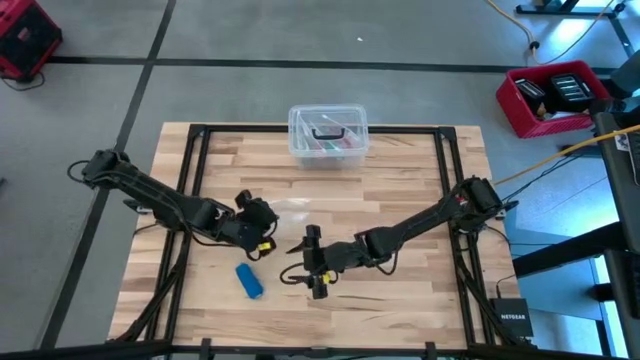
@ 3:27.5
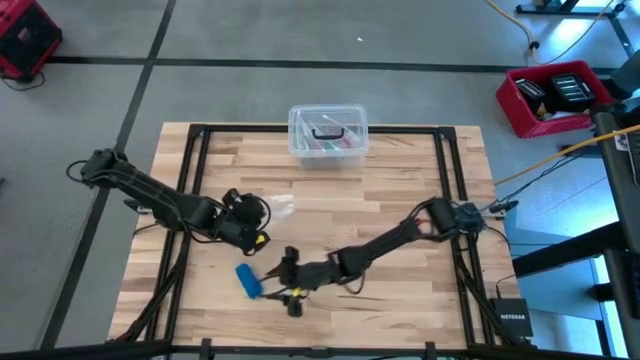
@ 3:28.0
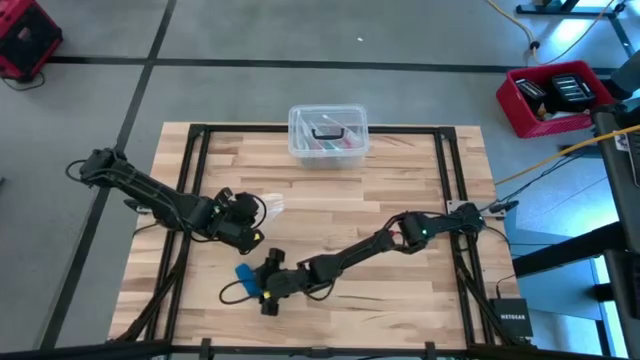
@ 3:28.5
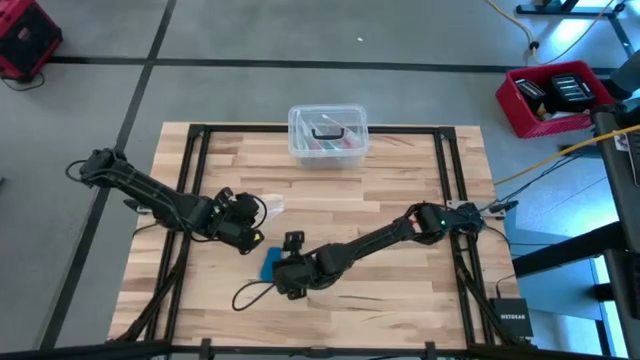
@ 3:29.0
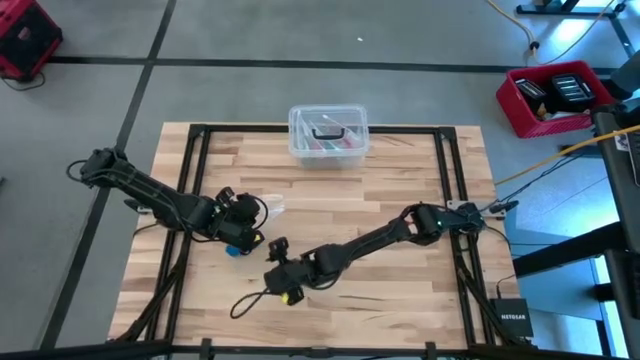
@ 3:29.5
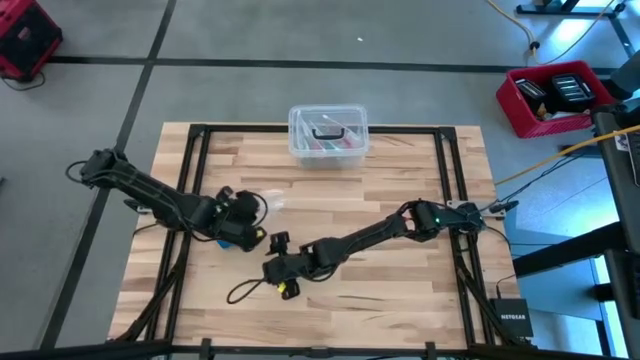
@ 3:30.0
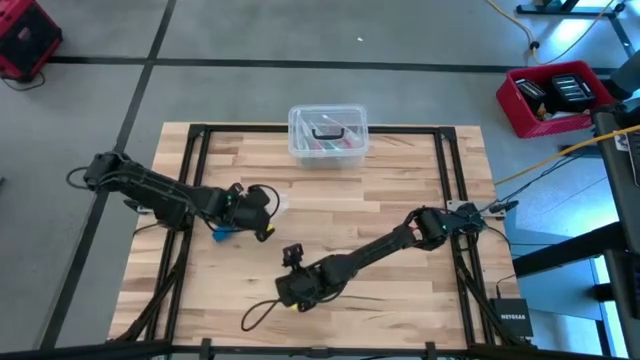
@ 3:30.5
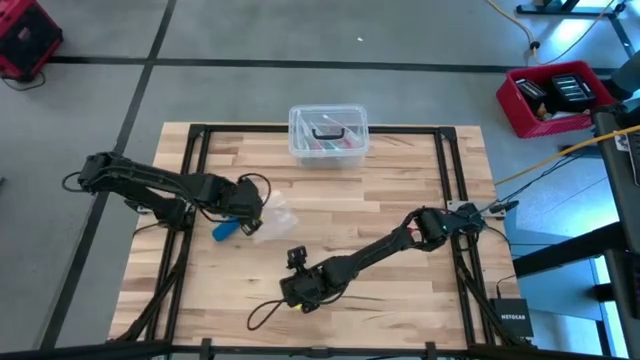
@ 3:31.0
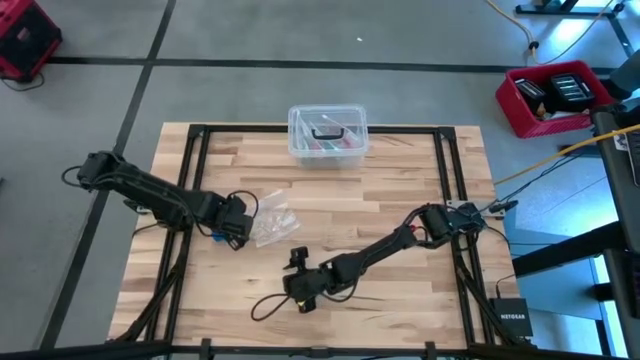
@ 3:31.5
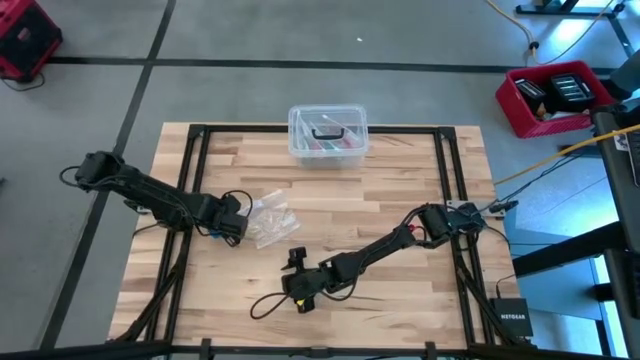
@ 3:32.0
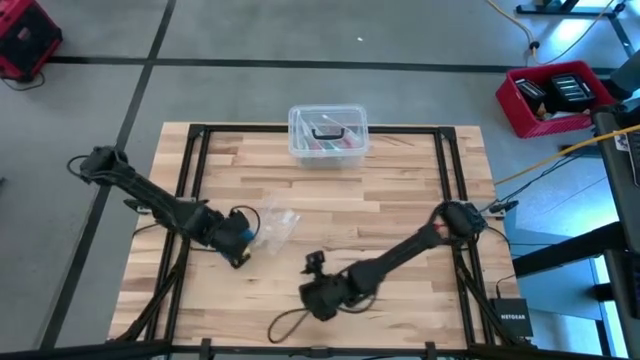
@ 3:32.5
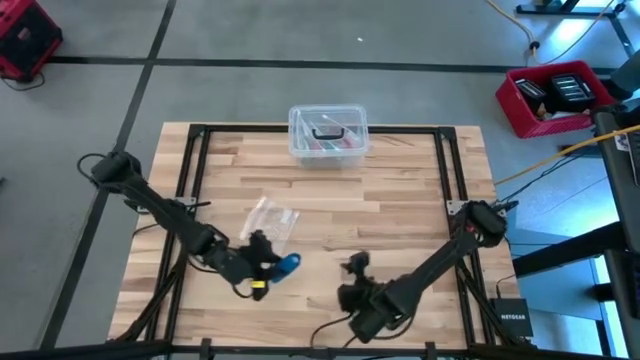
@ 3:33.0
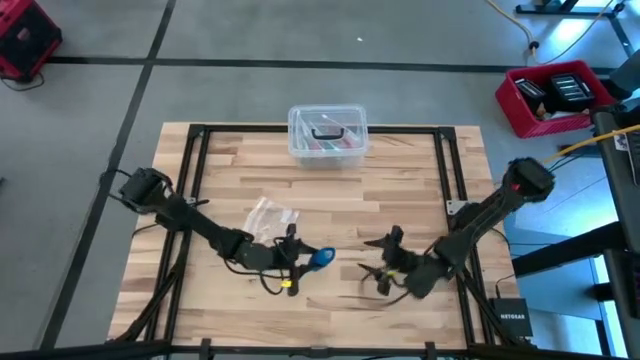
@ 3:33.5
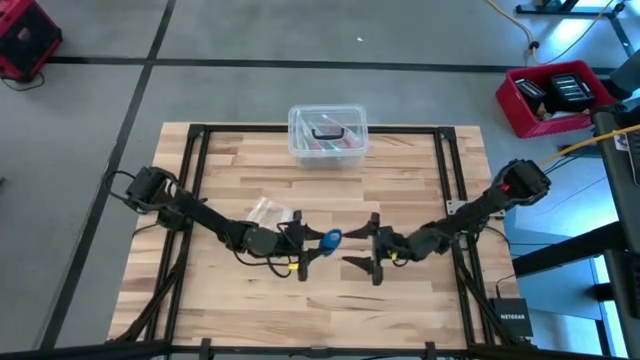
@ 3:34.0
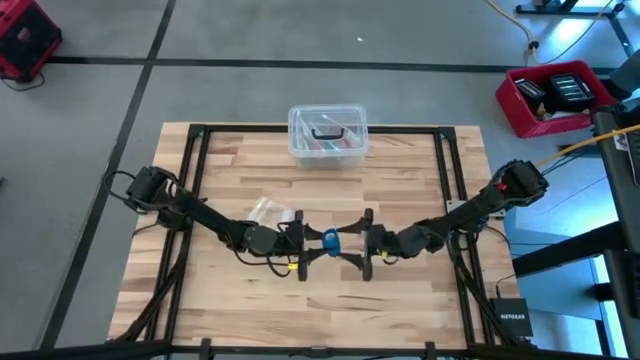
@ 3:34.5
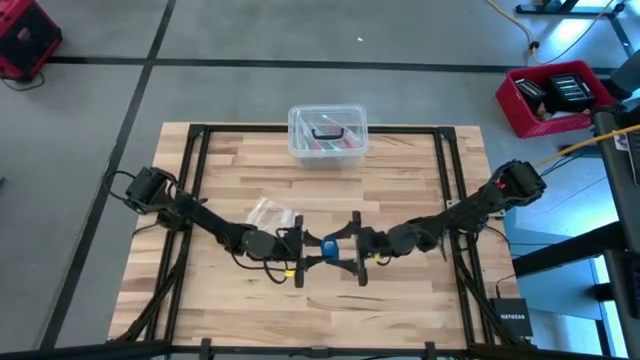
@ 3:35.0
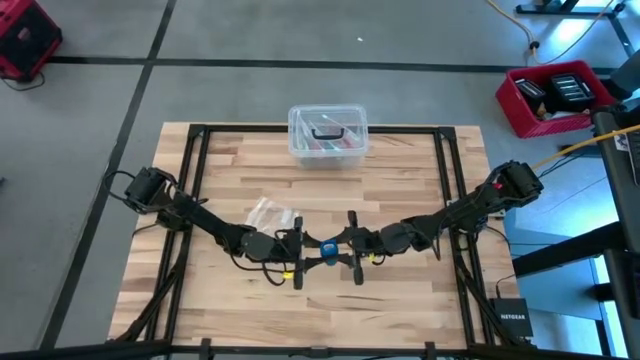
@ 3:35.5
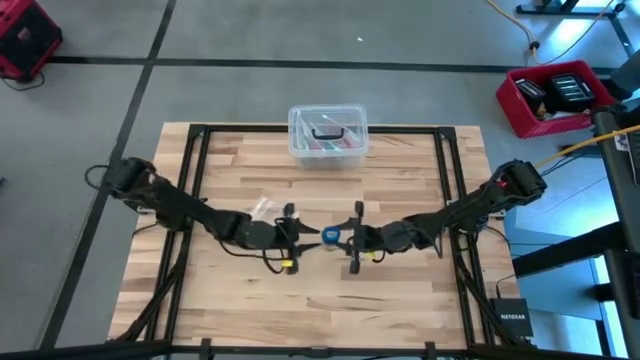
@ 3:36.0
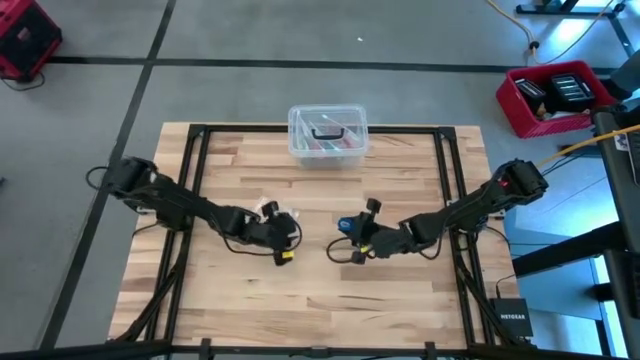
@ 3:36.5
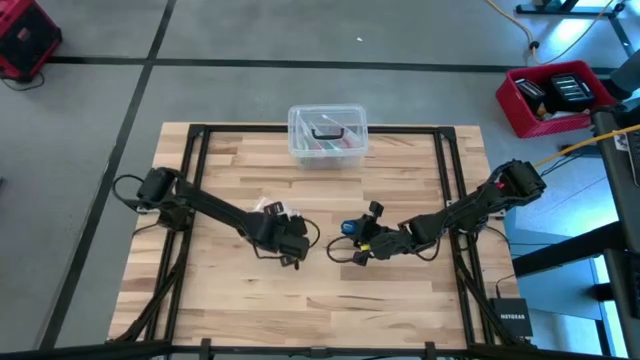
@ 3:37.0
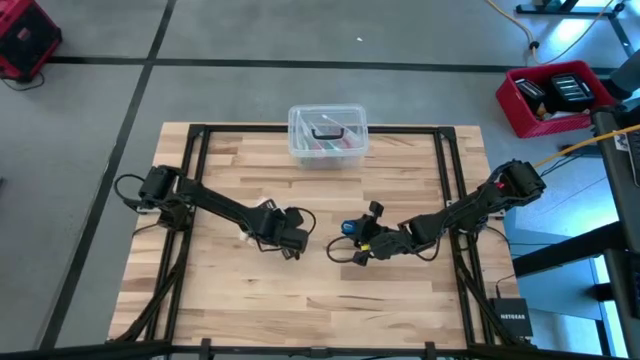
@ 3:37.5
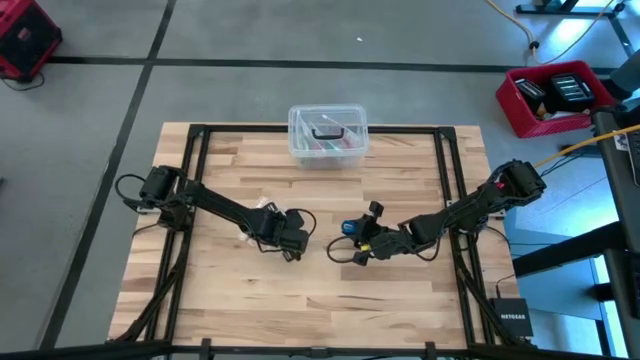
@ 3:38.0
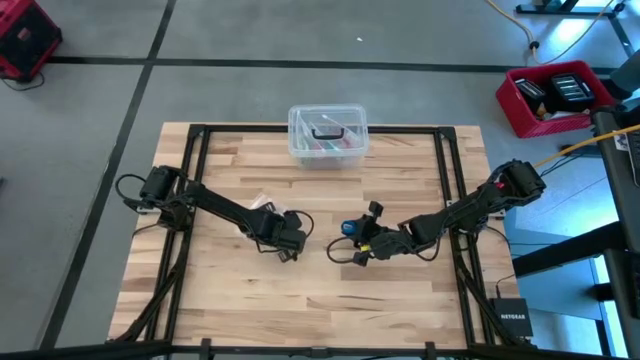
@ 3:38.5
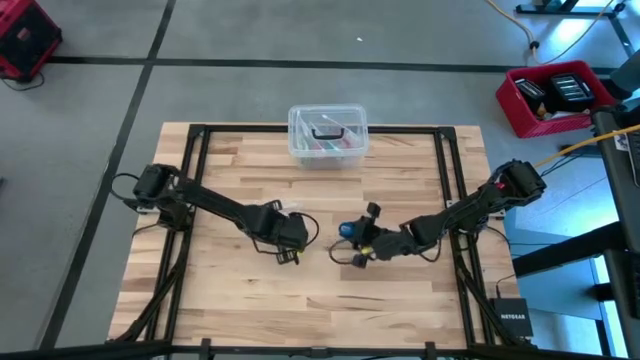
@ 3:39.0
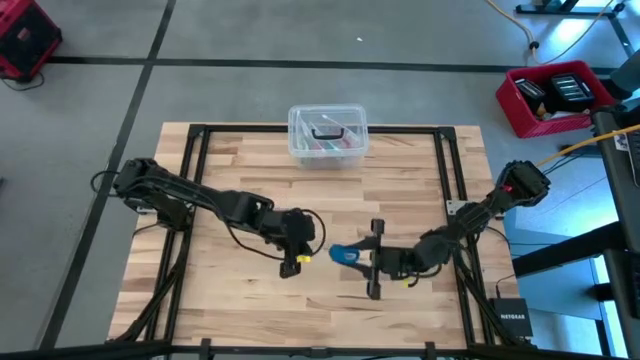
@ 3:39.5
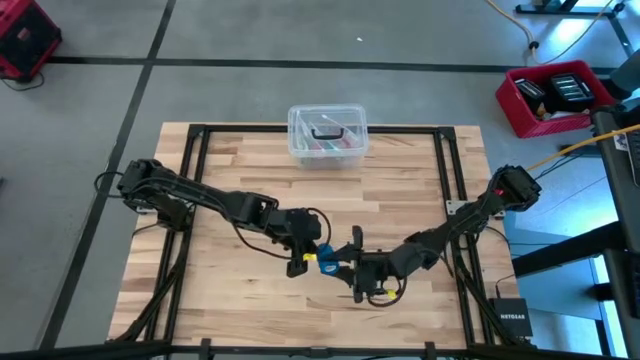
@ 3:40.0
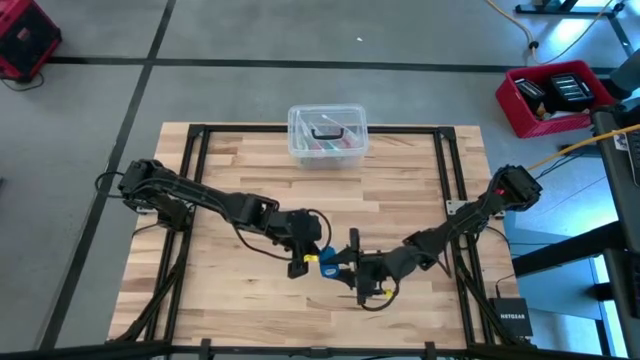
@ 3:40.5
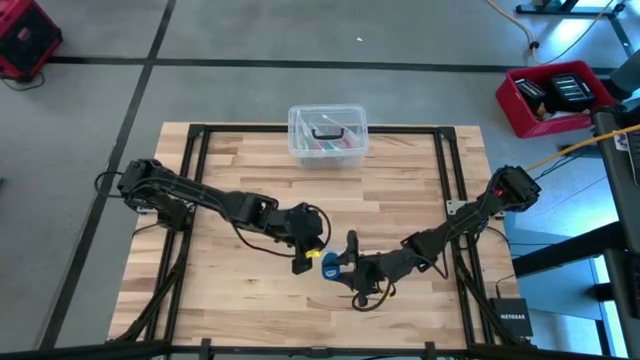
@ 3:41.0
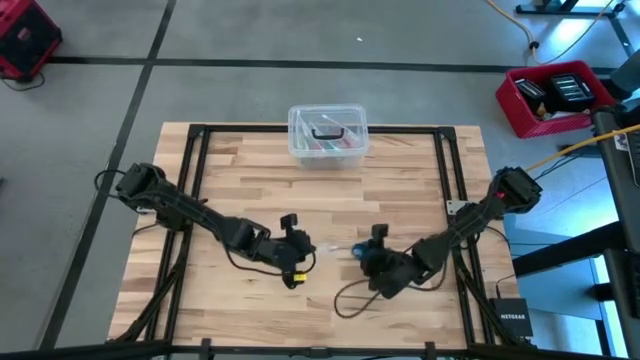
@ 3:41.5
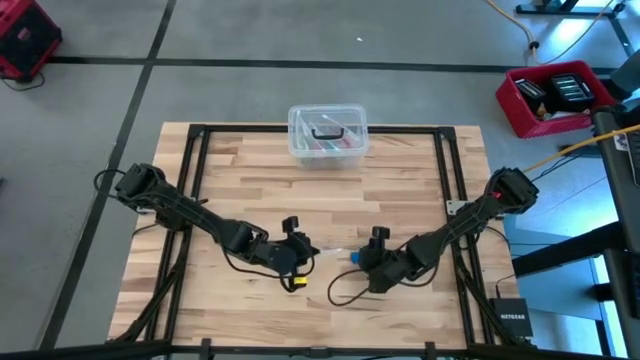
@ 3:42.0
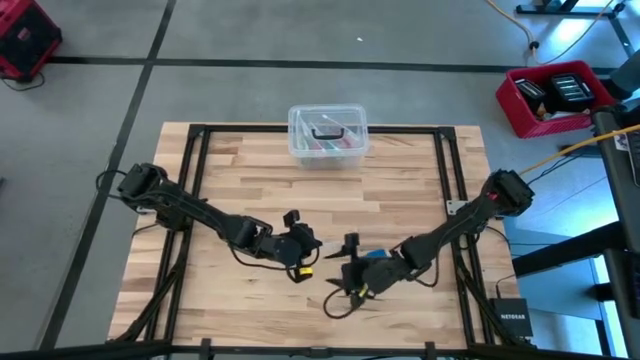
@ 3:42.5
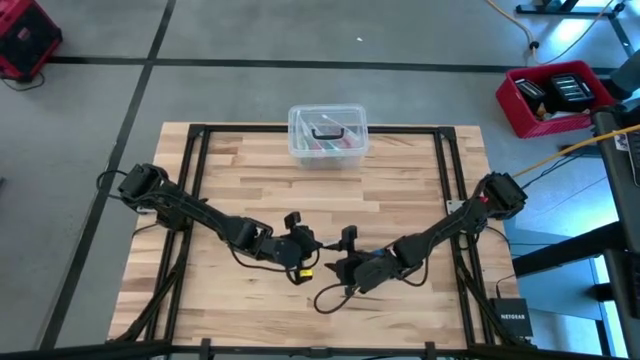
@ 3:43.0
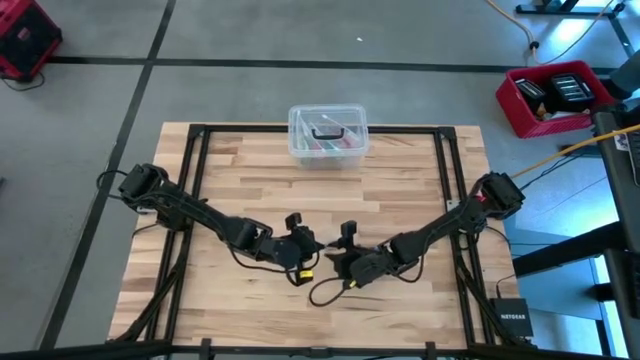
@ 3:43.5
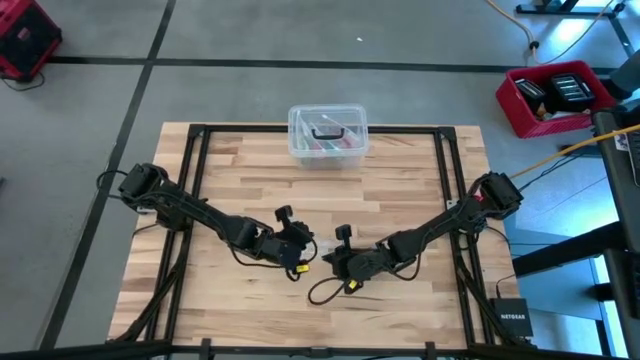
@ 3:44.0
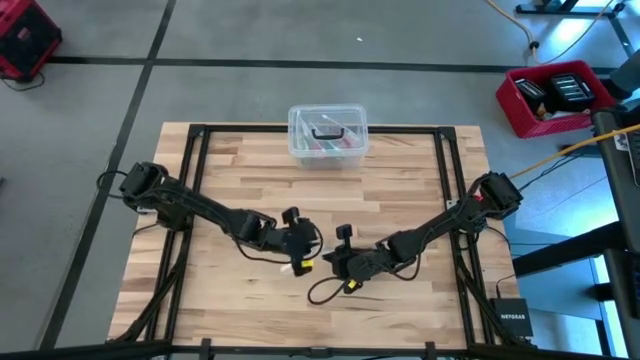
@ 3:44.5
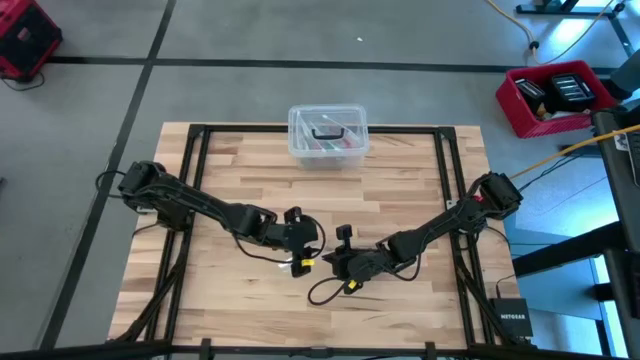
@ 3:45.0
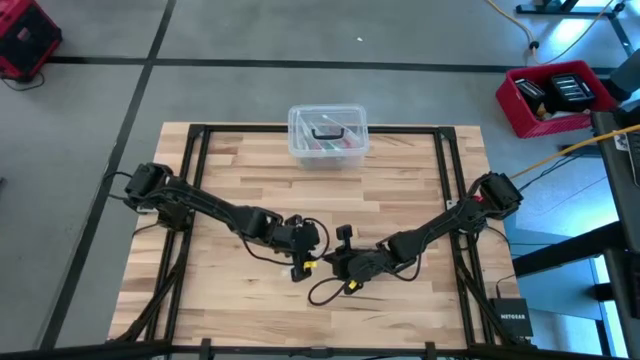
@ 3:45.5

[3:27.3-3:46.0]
Task: Roll bandage
Put the rolled blue bandage into the transparent zip bag

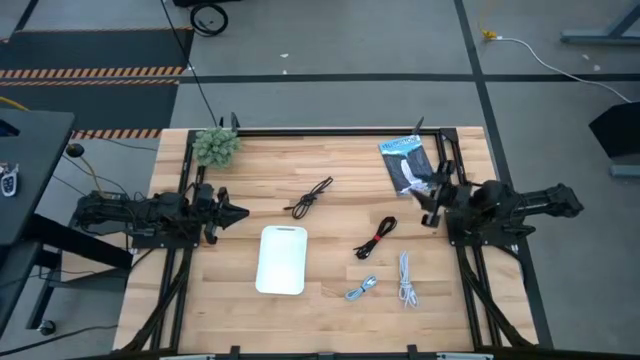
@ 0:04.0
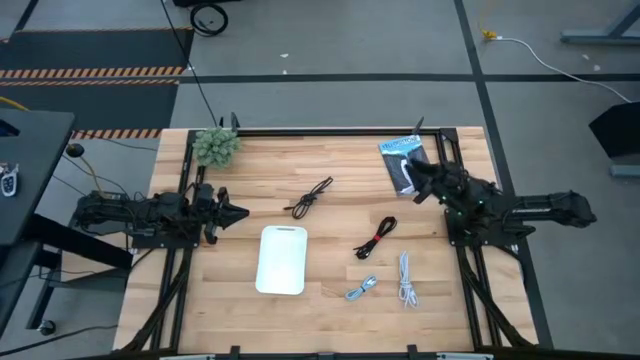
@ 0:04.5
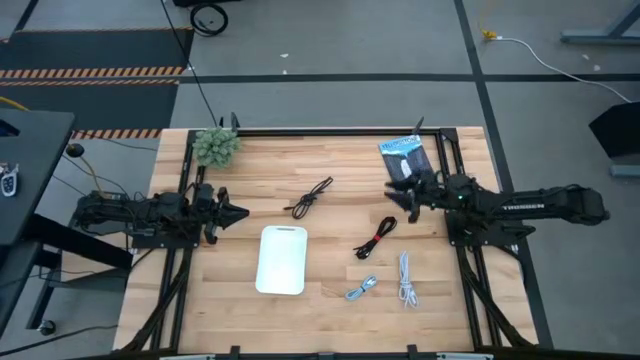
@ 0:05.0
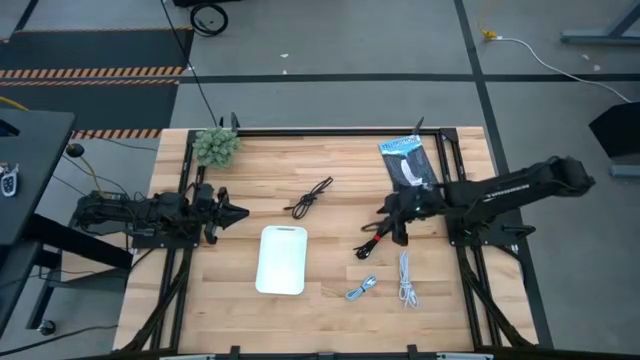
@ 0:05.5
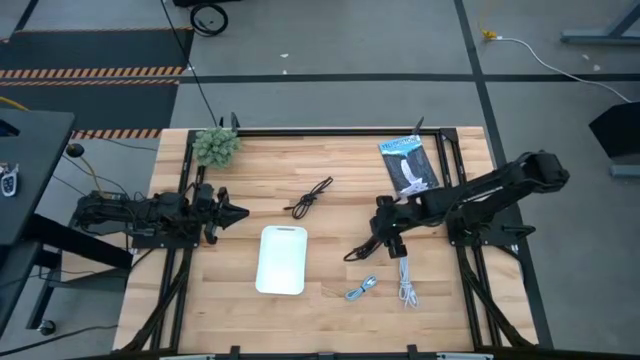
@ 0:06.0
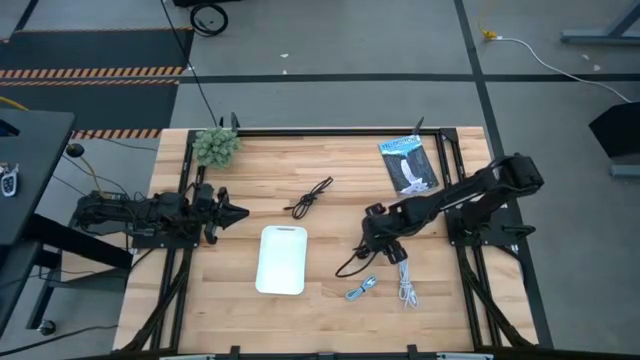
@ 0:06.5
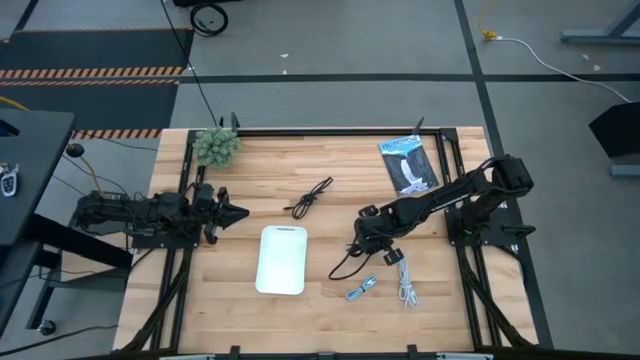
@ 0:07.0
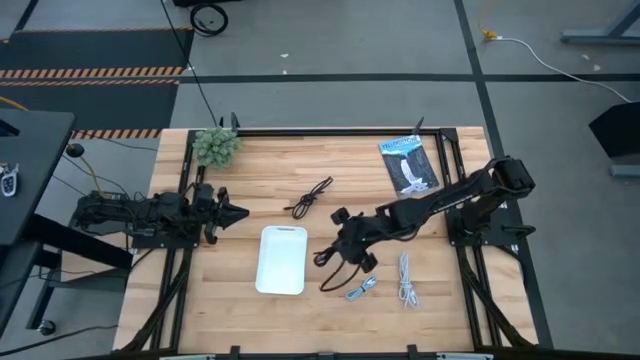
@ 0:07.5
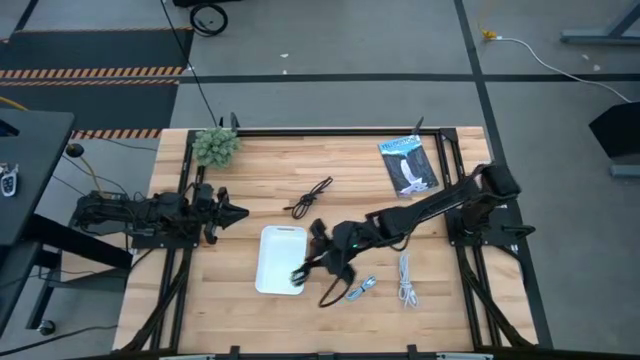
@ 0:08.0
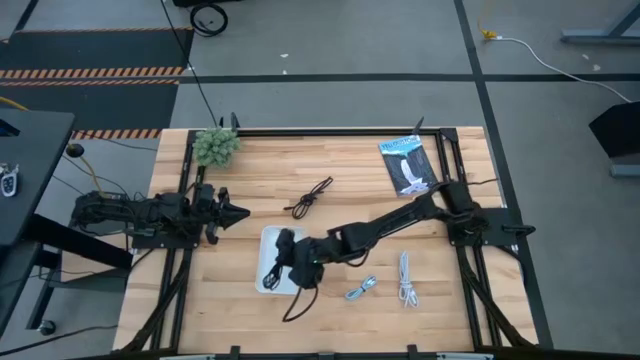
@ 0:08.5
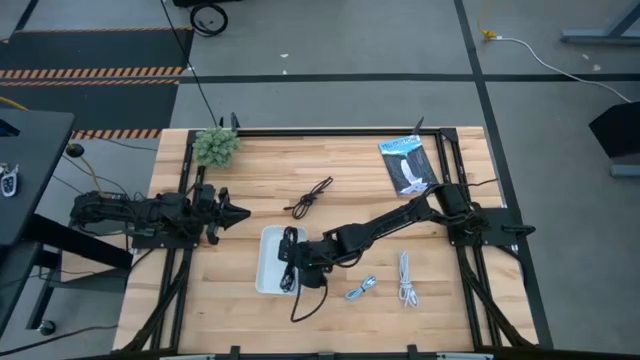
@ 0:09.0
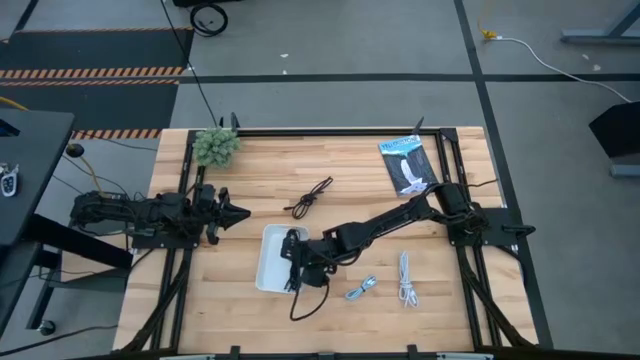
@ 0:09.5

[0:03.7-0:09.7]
Task: Pick and place USB-C Cables
Put the right black charger cable into the white bin
